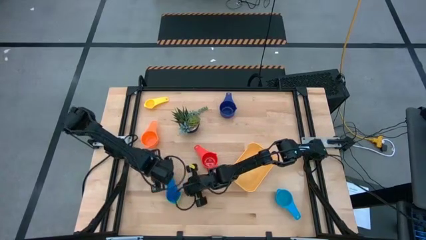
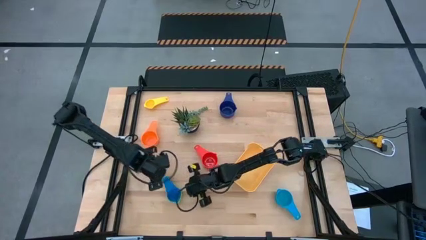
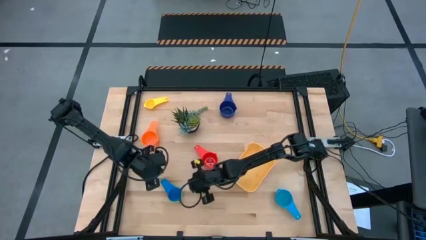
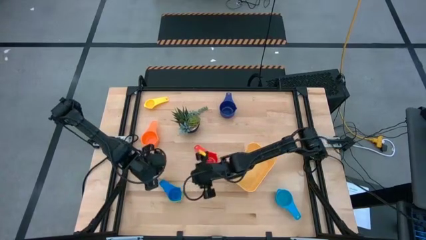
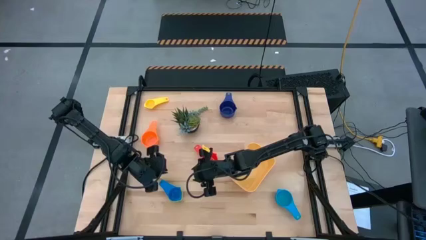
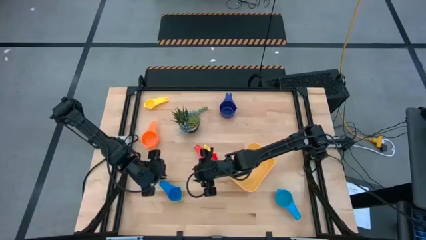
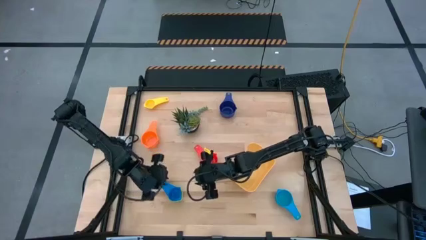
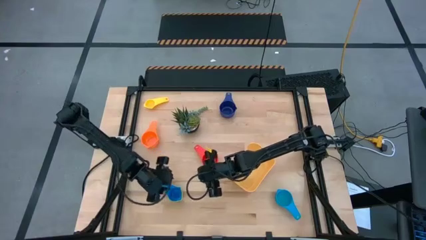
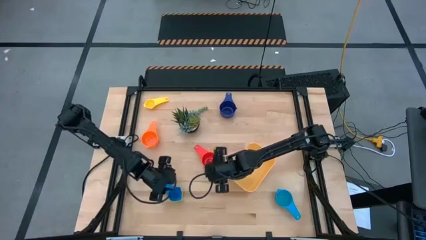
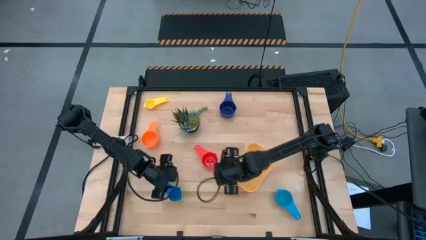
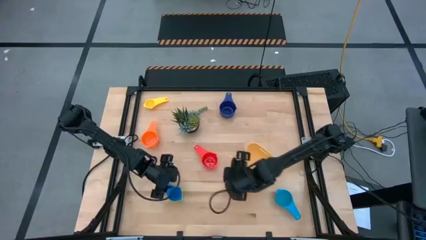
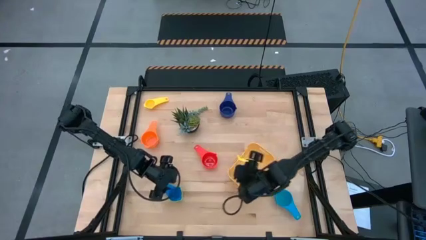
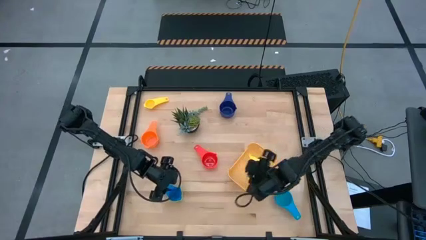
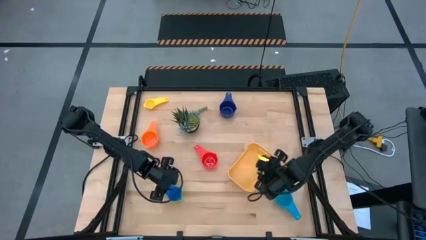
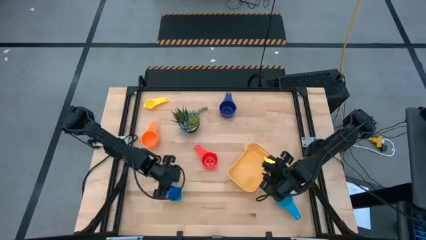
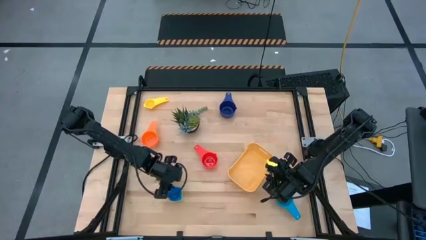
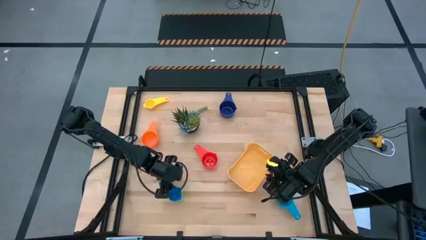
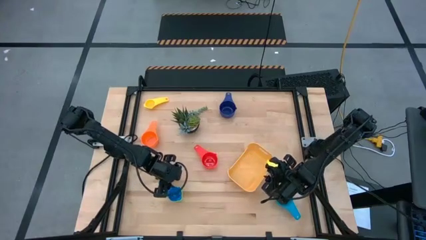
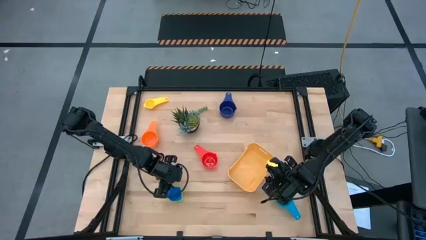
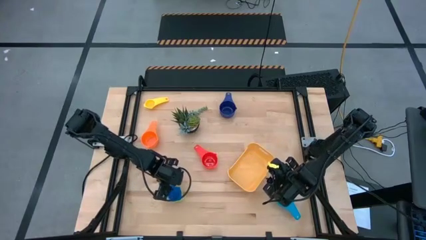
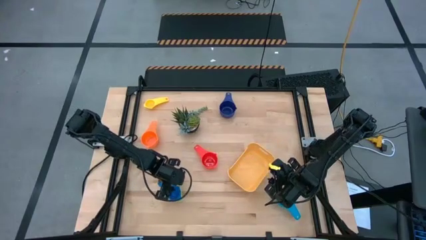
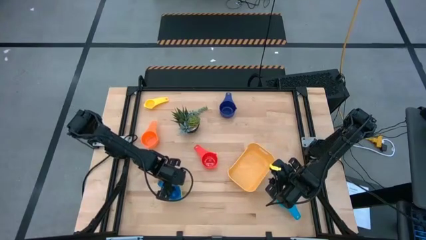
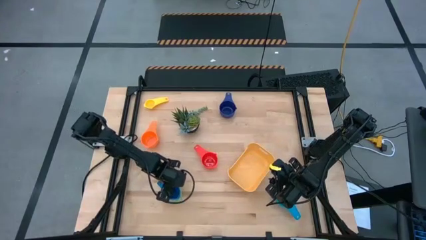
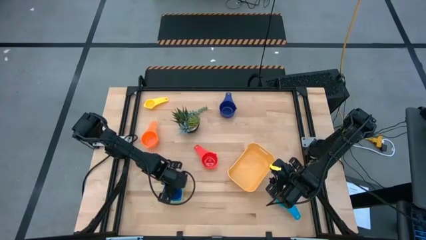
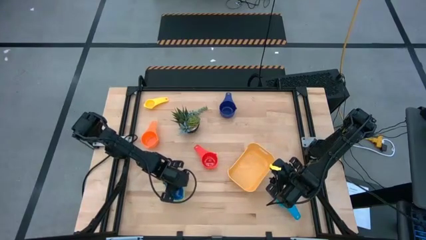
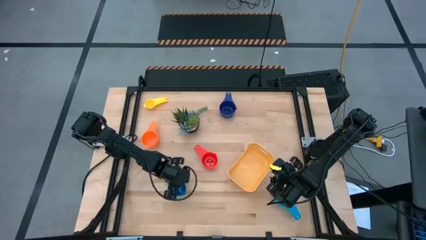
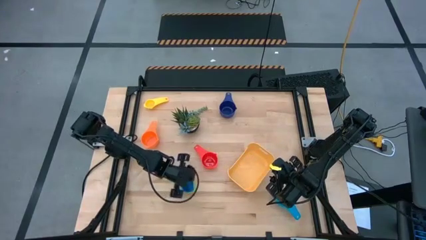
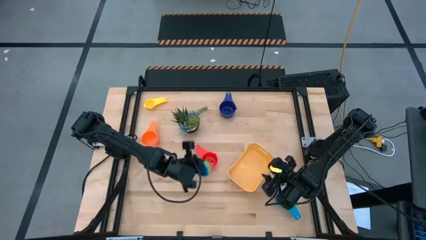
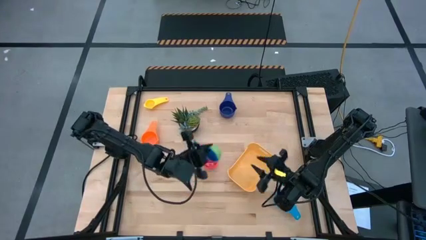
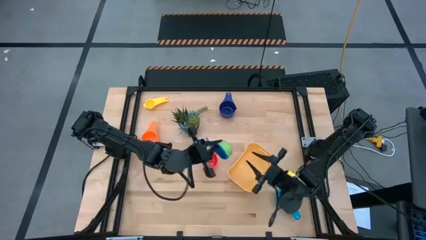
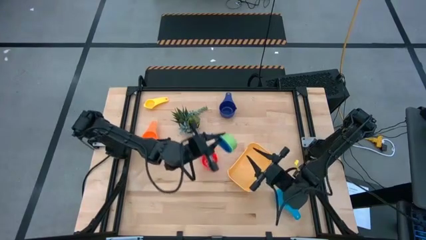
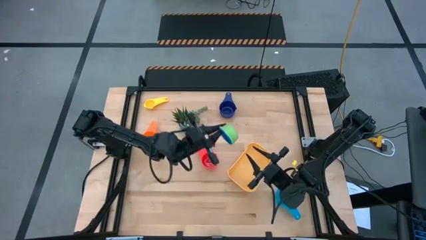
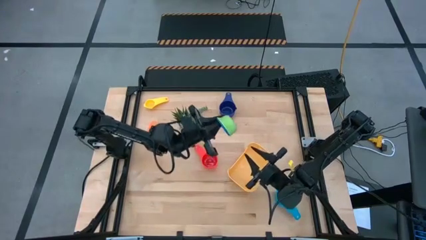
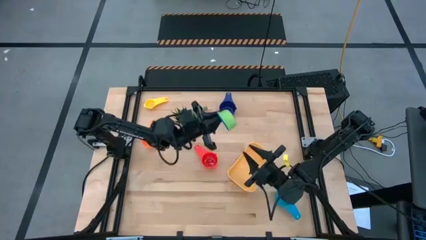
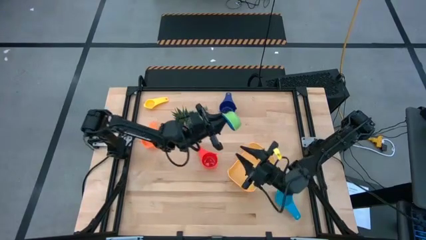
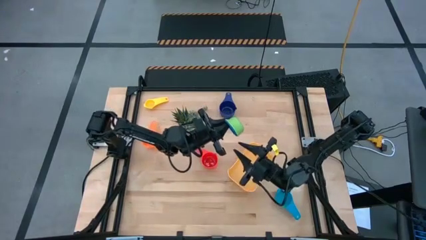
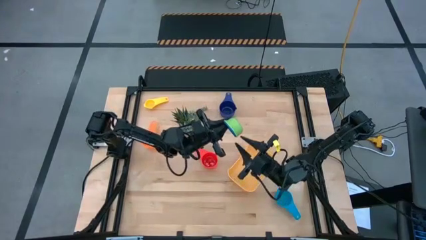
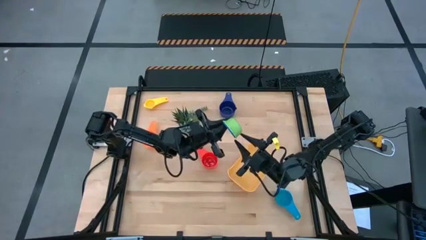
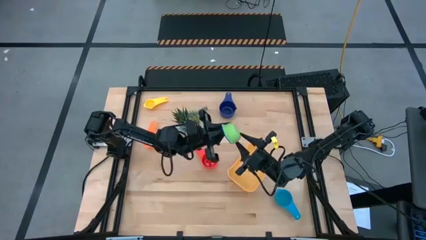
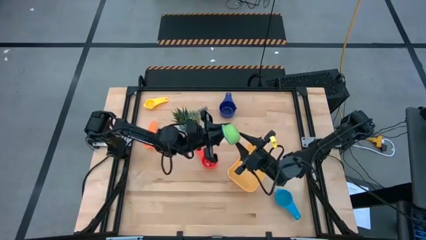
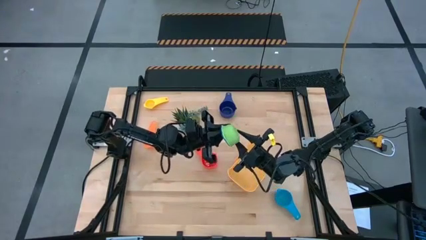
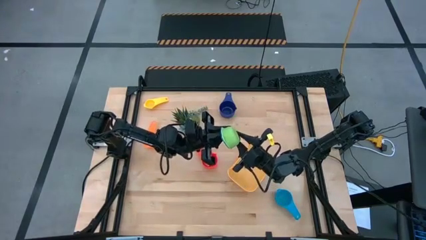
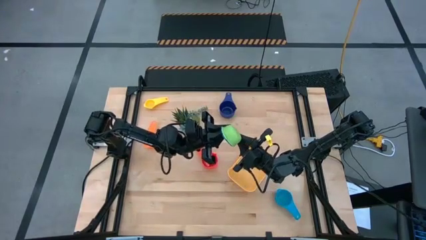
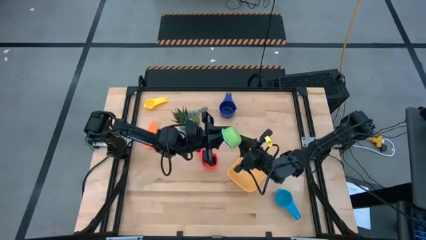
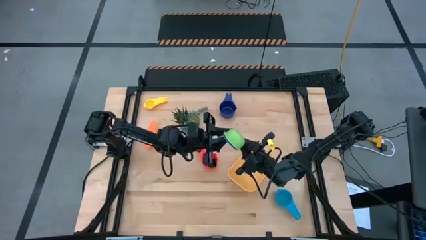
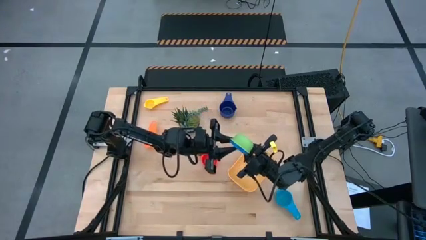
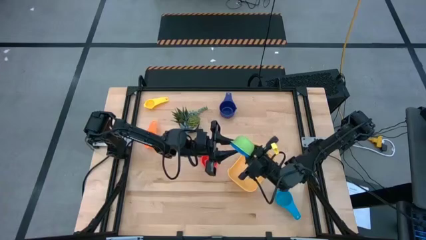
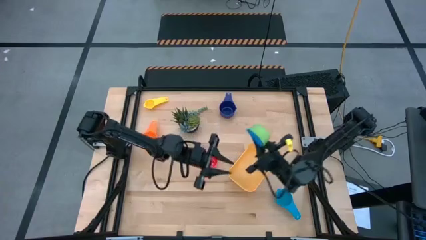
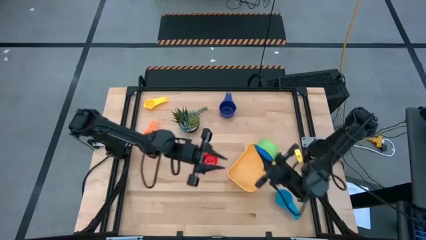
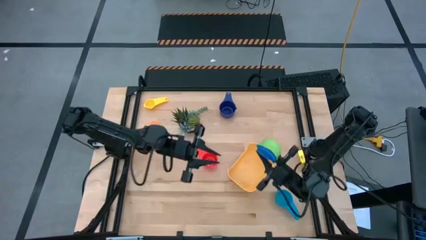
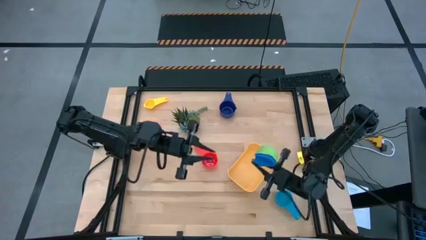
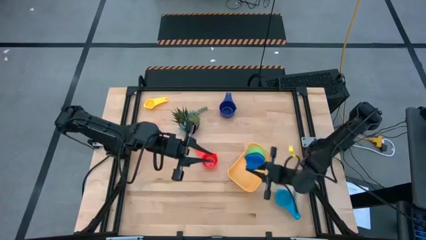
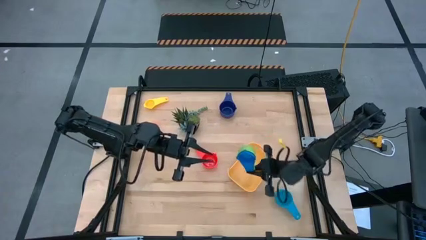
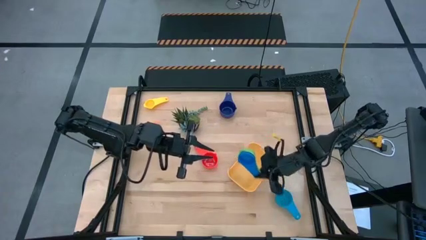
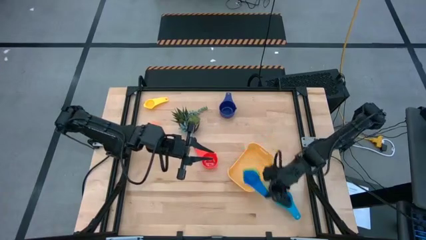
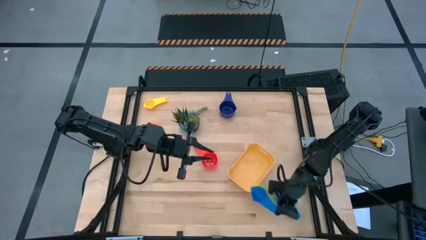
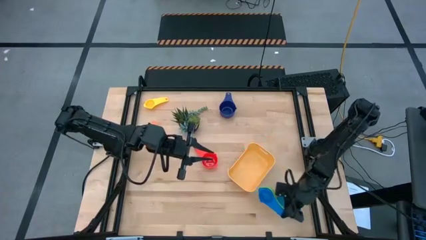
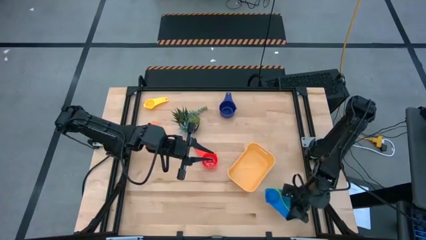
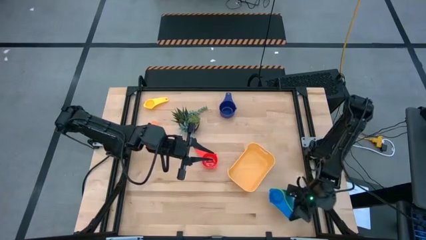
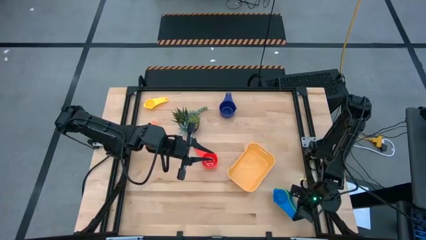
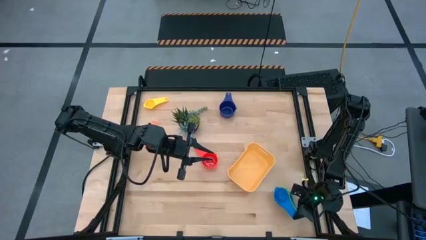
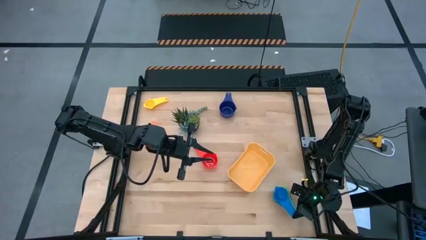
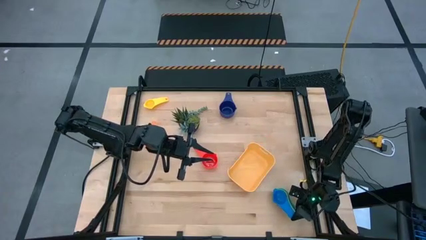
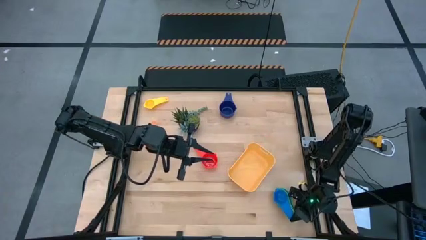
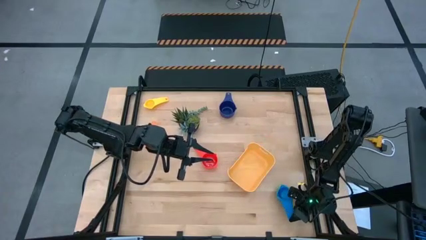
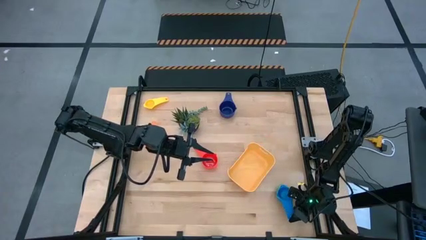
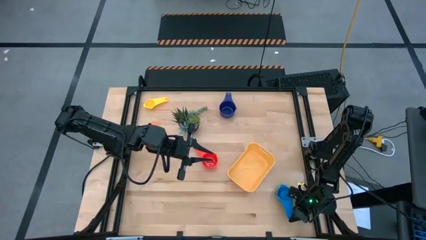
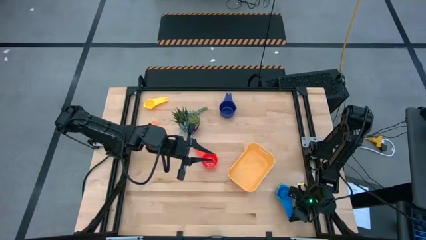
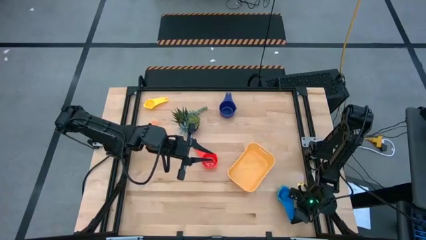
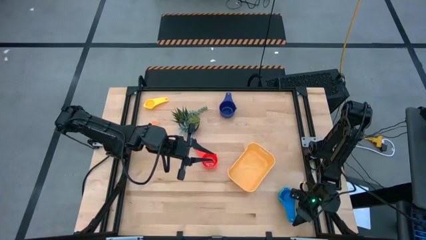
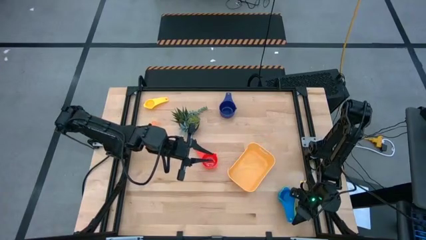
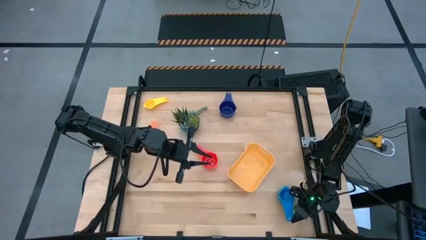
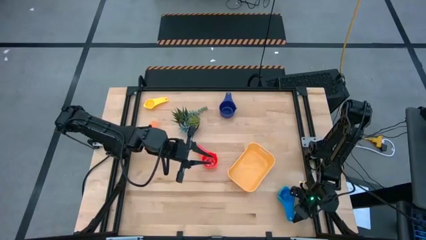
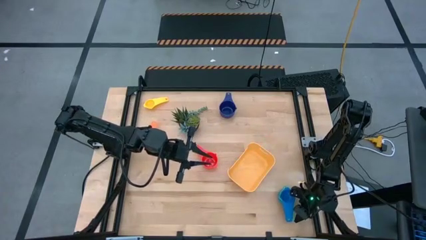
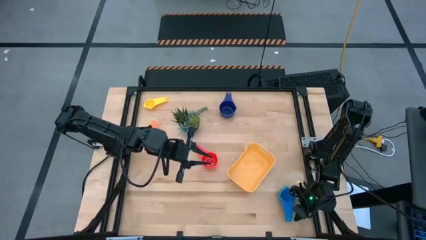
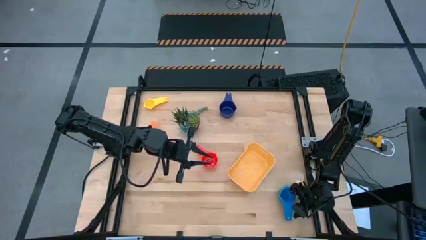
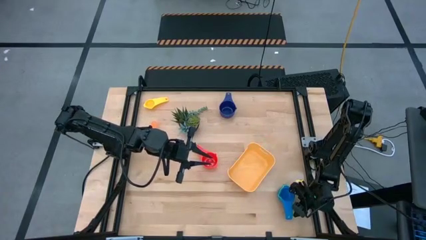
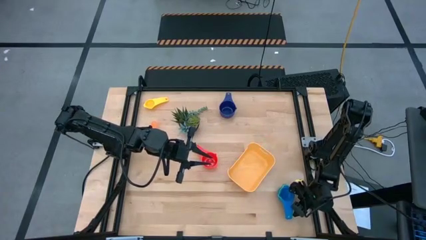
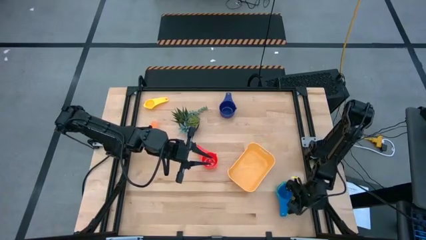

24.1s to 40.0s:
Task: Nest measuring cups in basket
Stack the measuring cups on the light blue measuring cup

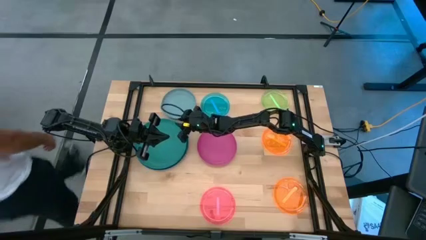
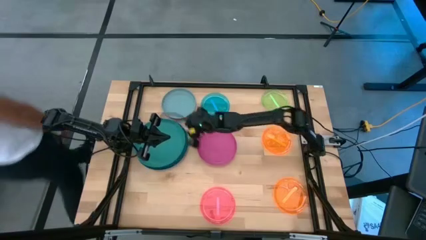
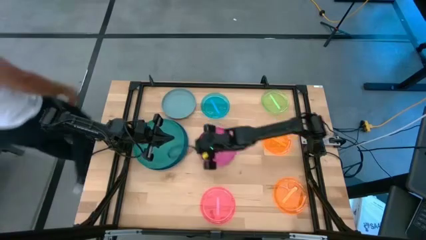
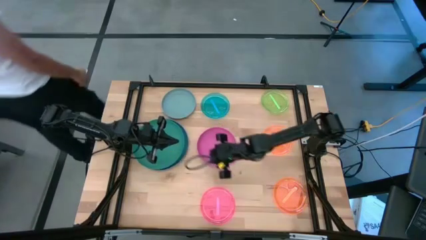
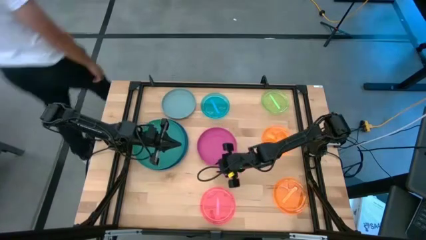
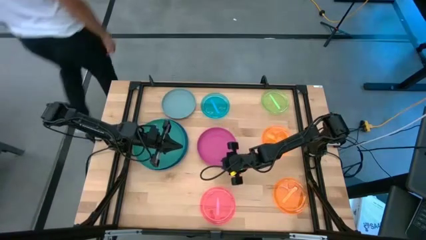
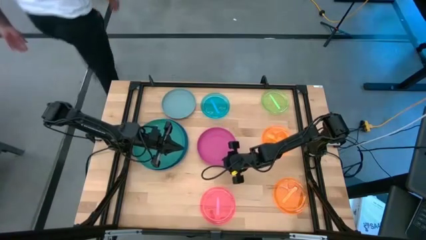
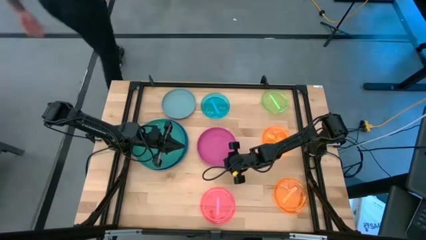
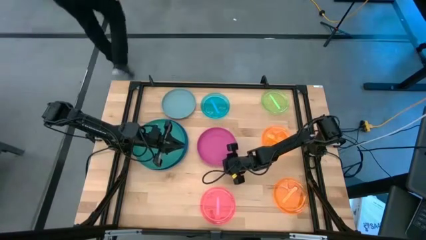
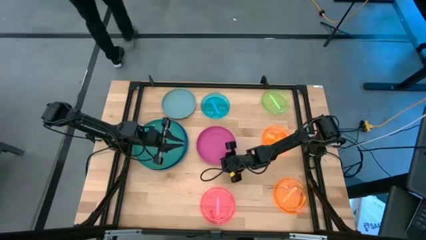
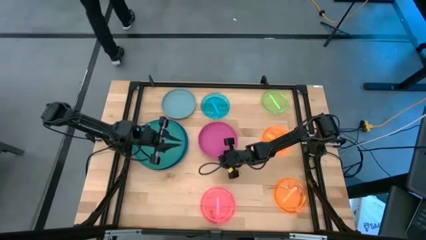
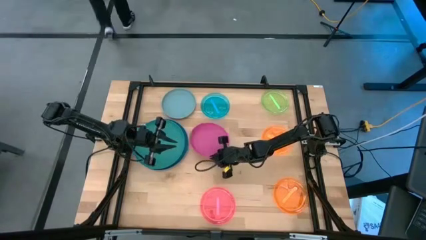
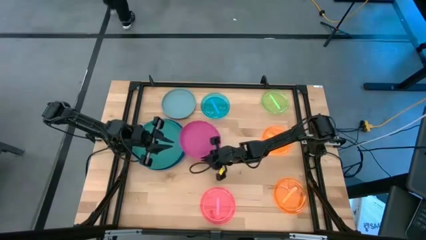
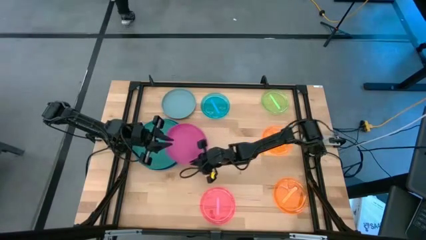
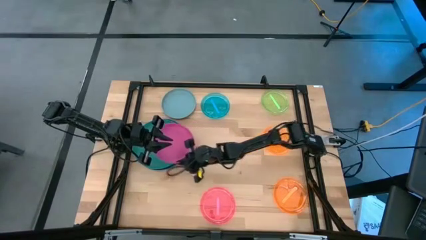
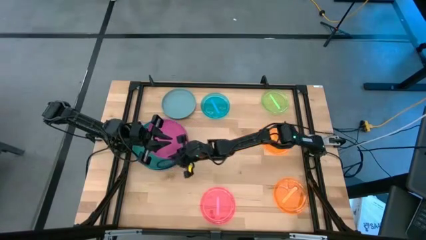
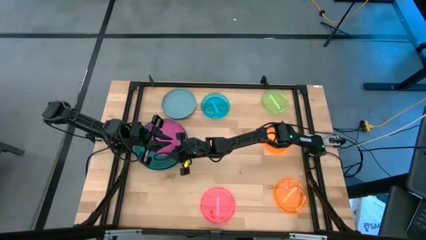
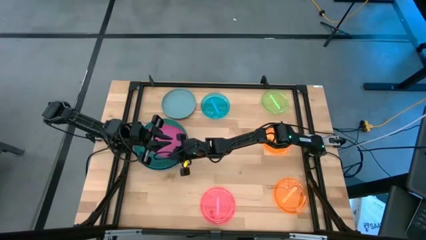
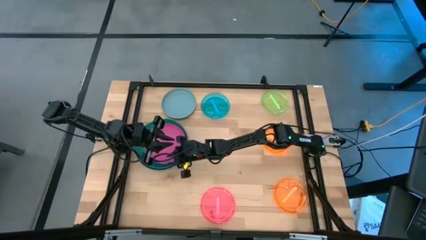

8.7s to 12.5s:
Task: Stack plastic plates
Stack the dark pink plate on top of the green plate
